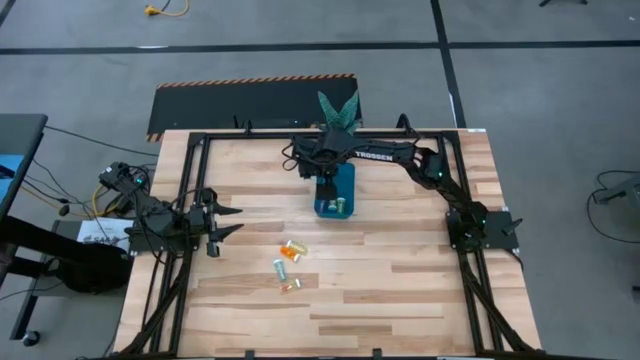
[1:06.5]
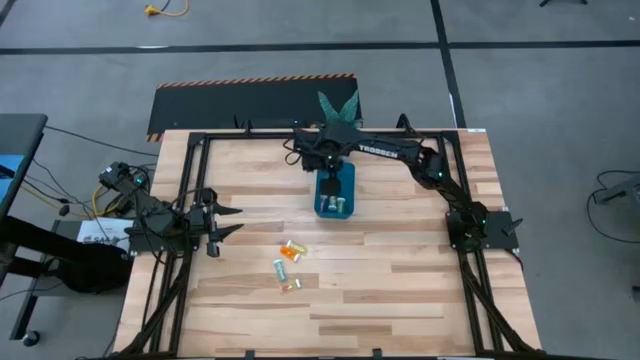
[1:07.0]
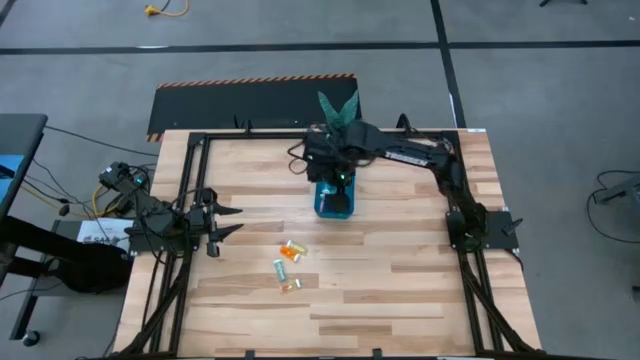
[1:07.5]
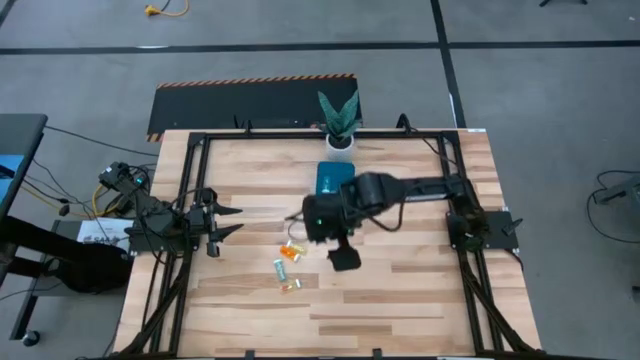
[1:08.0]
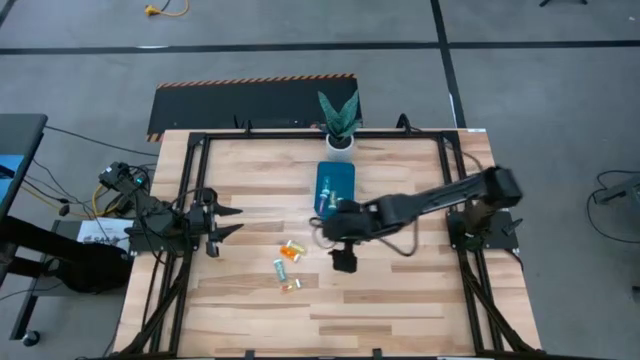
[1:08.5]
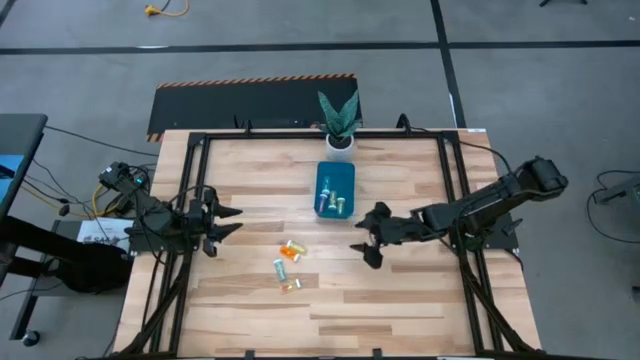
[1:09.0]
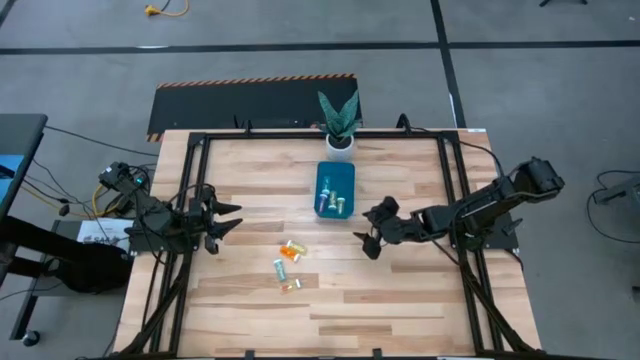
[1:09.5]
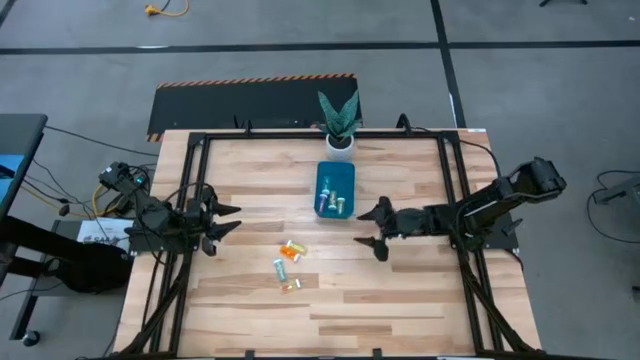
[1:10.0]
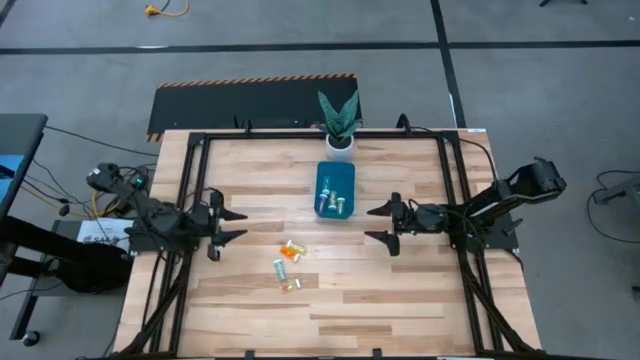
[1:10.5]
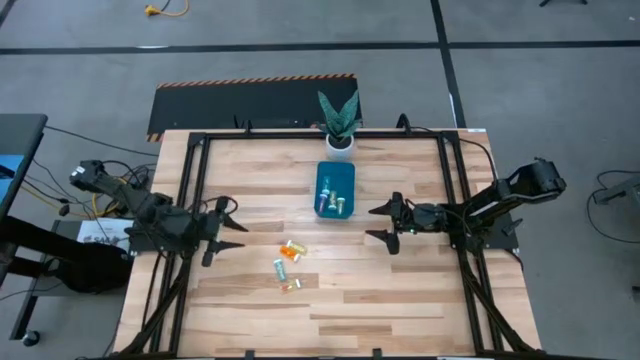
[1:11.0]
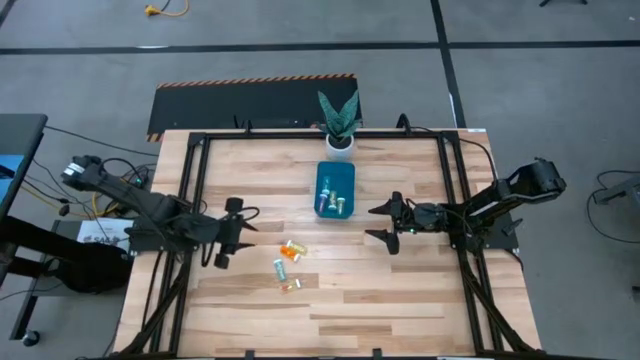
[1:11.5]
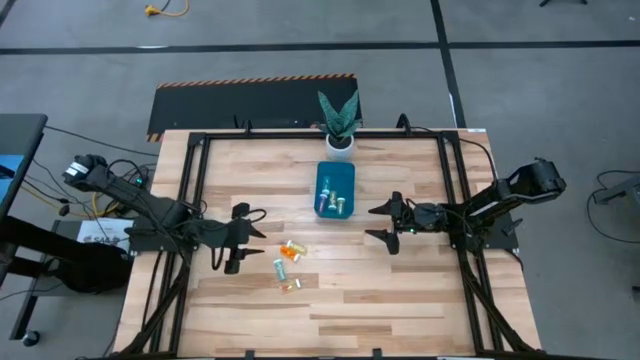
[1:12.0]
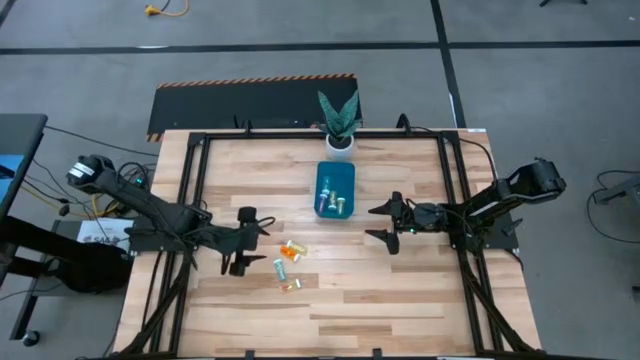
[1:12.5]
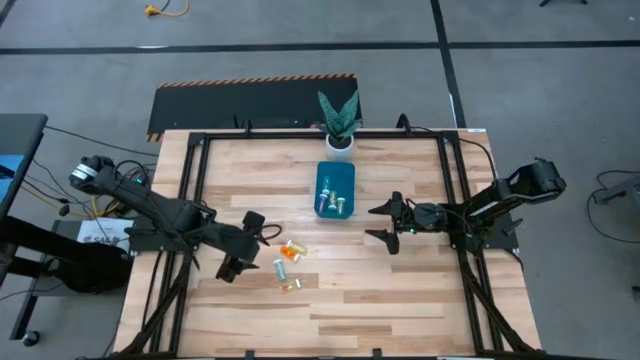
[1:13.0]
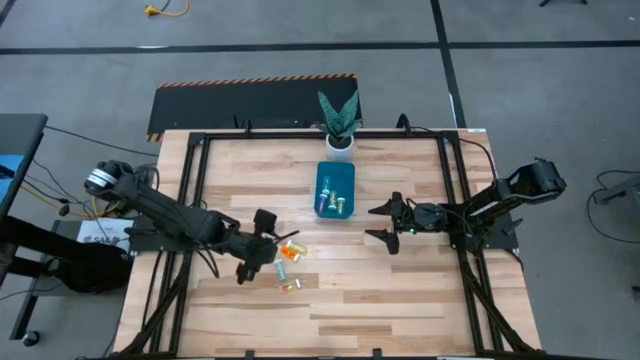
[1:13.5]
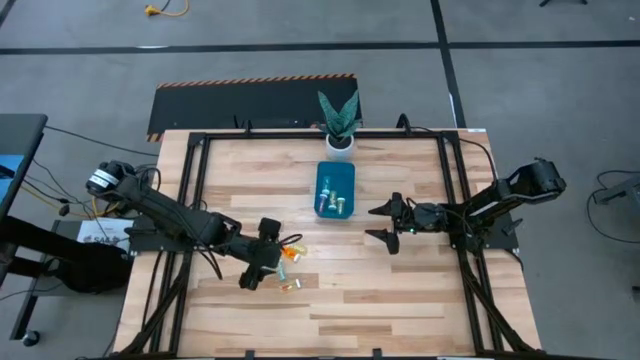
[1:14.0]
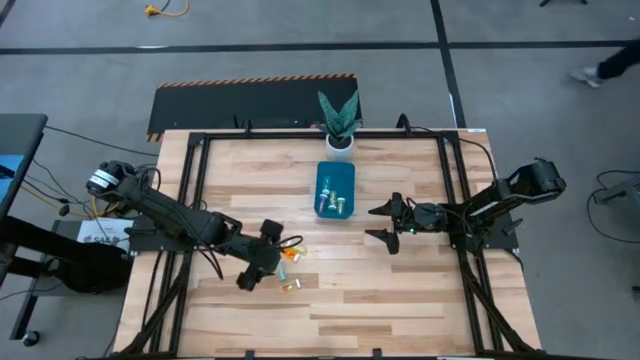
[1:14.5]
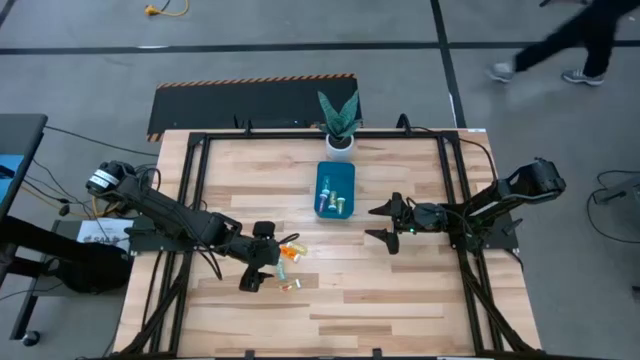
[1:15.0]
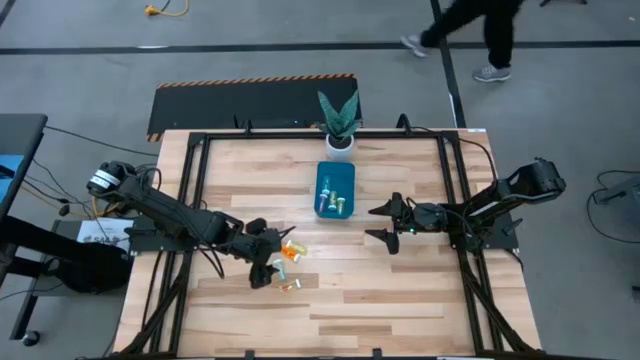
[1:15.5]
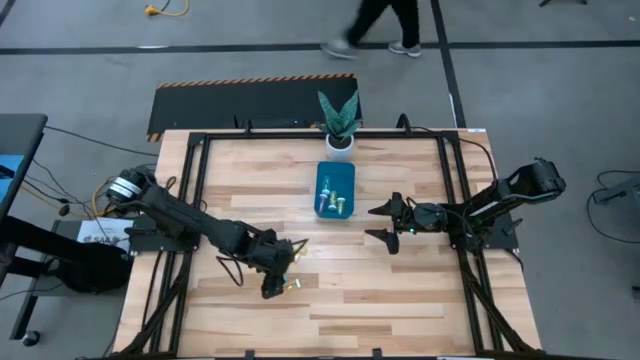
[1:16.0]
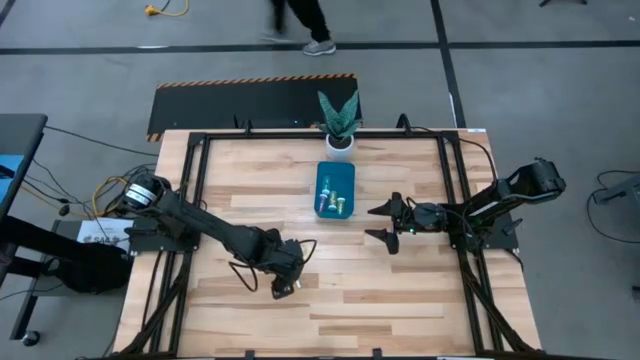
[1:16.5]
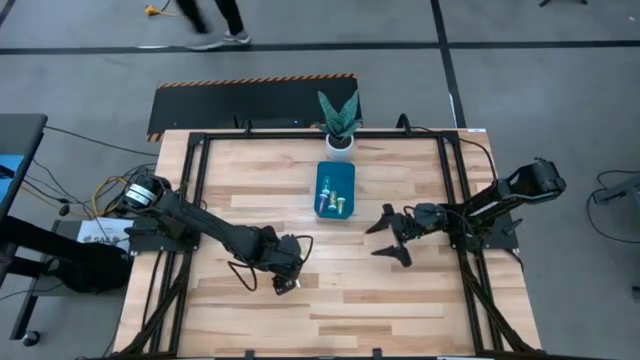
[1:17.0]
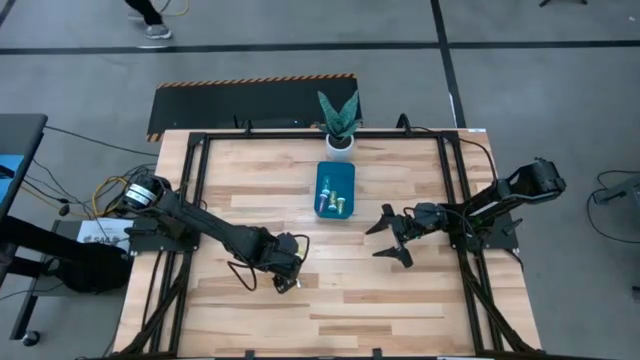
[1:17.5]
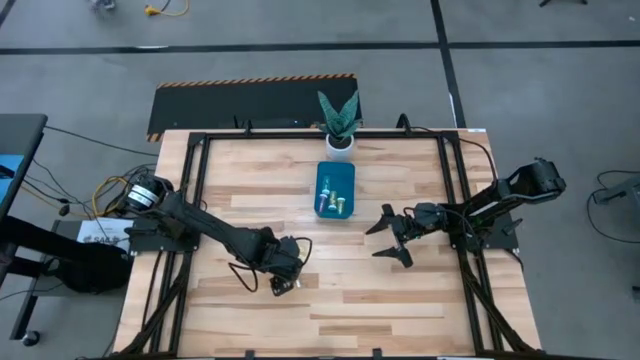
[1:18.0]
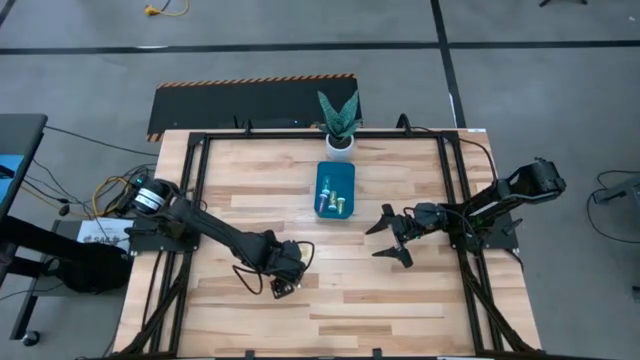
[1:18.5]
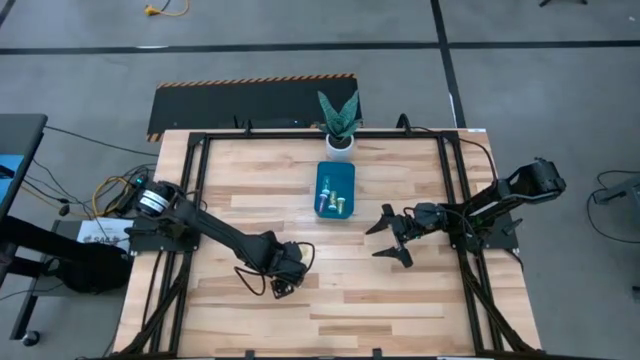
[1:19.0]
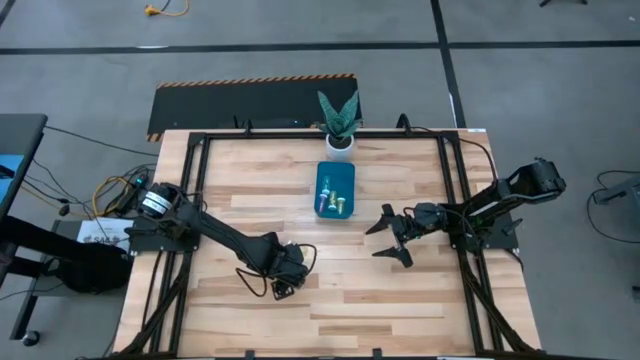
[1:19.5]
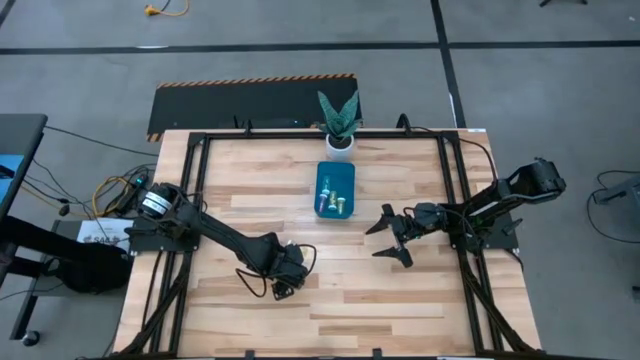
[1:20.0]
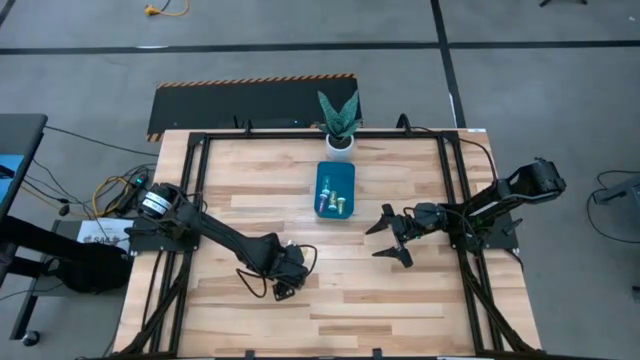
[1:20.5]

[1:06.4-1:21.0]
Task: Pick and place pill bottles into a basket
Put the blue pill bottle into the bin

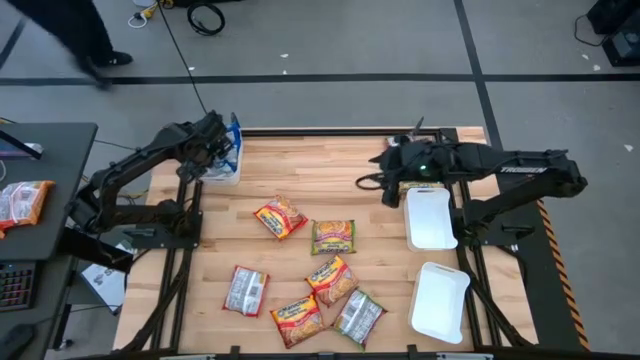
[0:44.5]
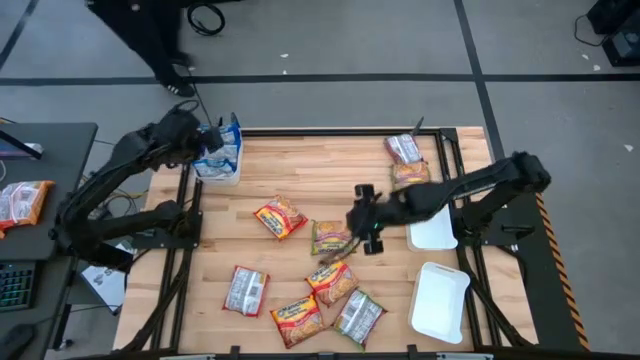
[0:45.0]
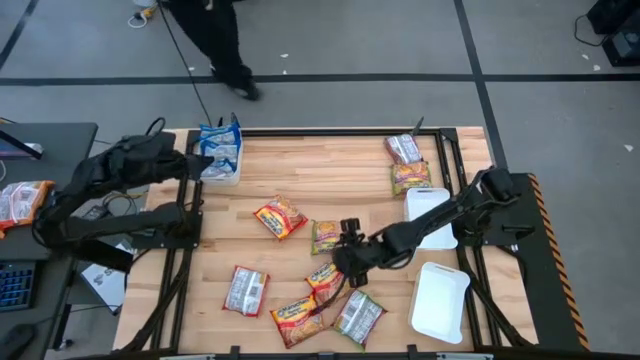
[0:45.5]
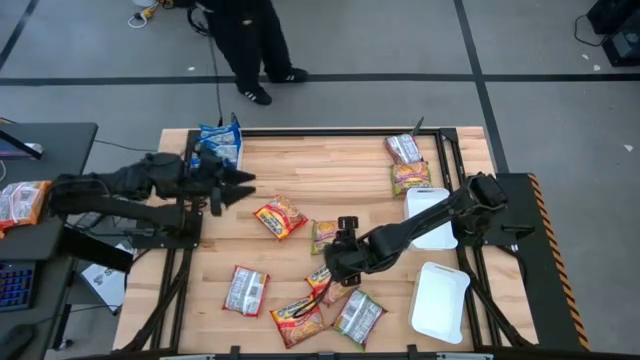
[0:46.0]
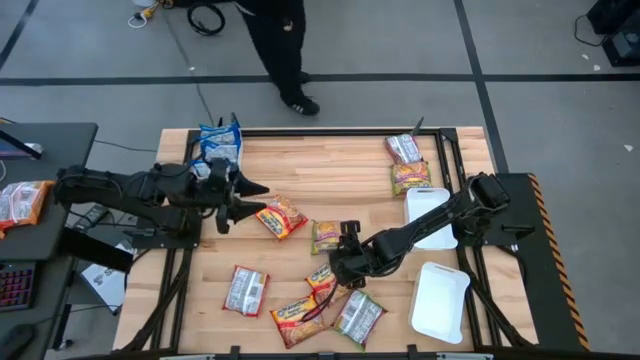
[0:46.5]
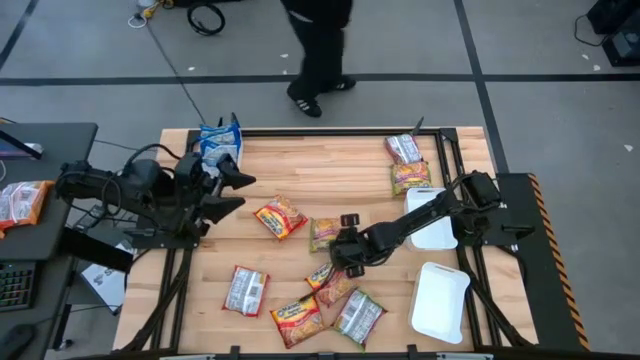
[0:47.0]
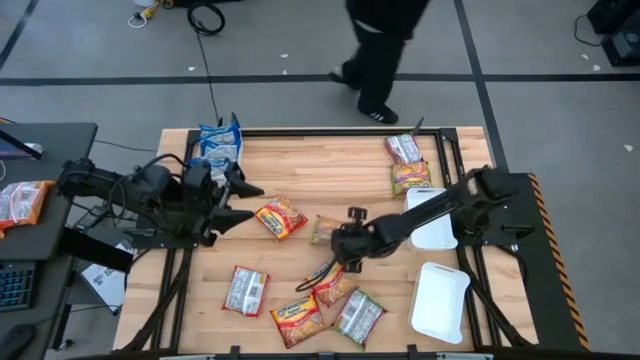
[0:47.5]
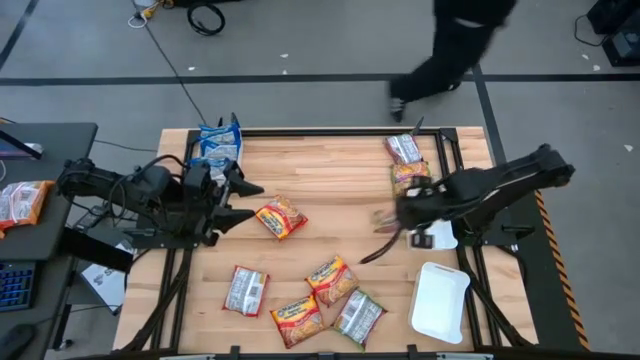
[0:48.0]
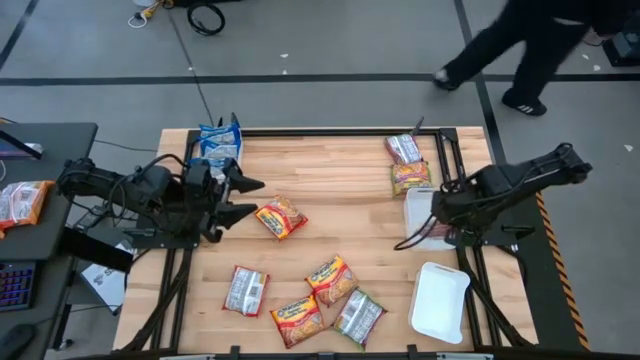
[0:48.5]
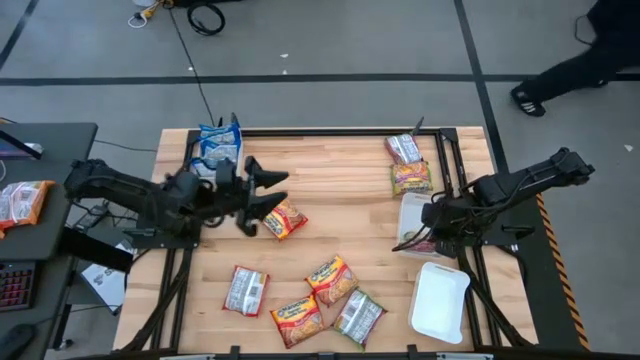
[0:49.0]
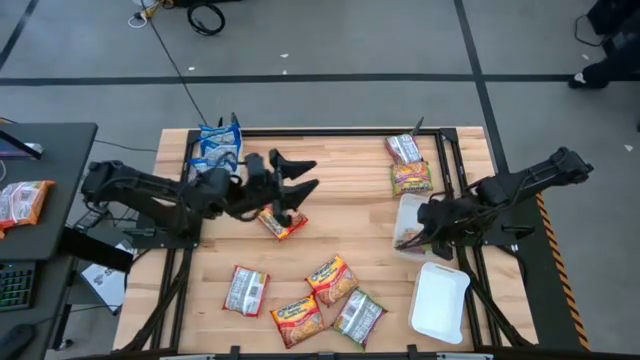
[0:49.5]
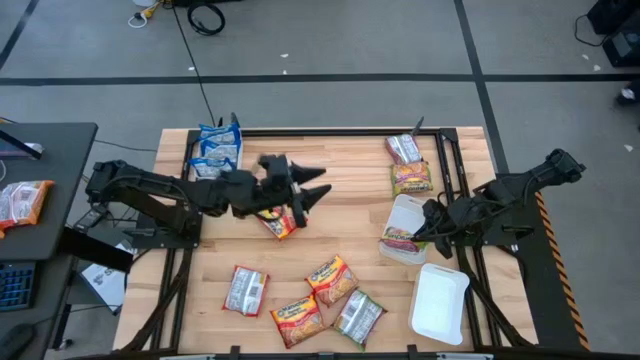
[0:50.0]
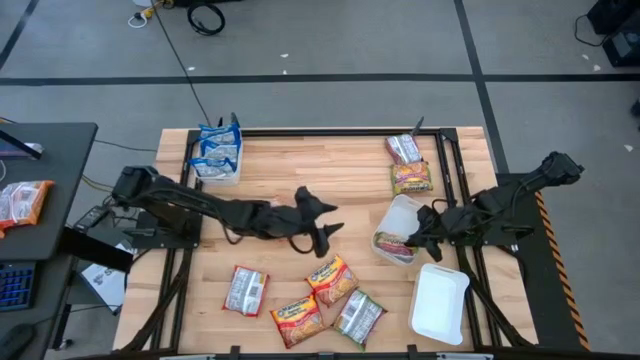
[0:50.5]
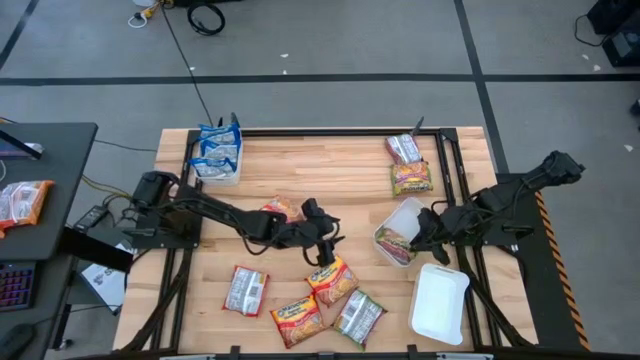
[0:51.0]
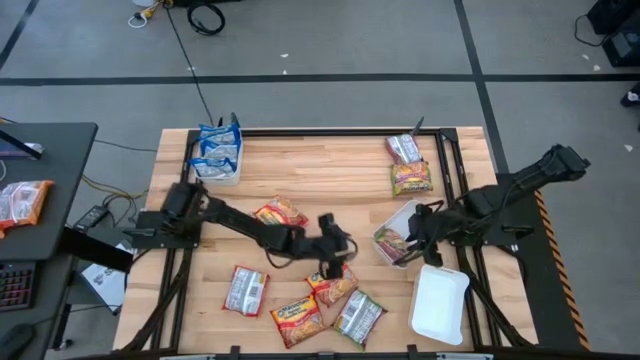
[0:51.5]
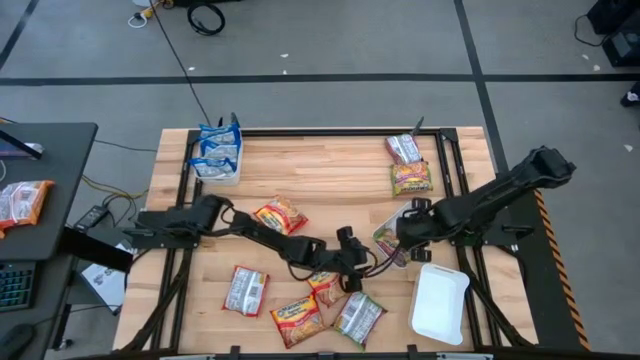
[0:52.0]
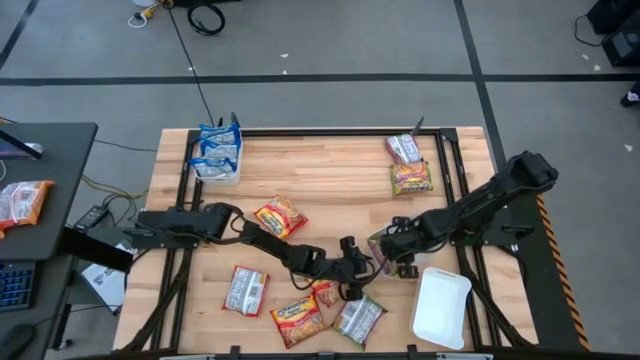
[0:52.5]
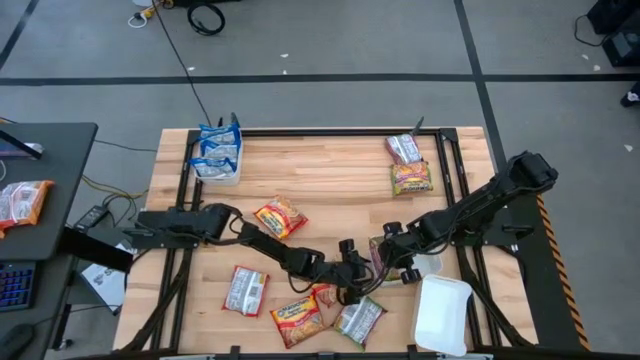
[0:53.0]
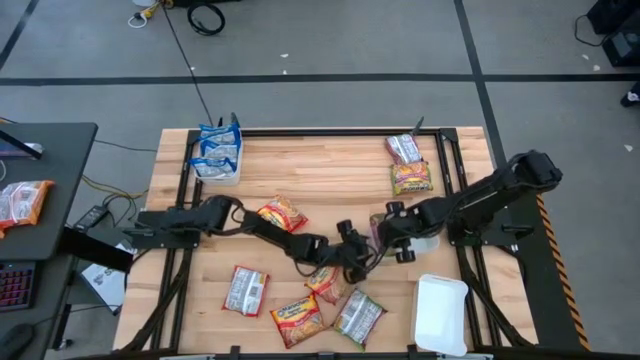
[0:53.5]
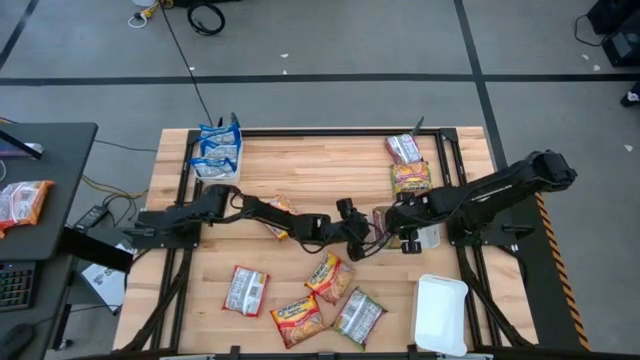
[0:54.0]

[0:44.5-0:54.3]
Task: Sort Maruchan noodles
Put the green noodle pack into the middle right white bin
